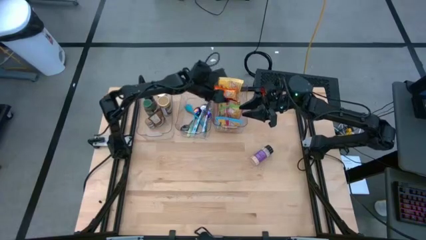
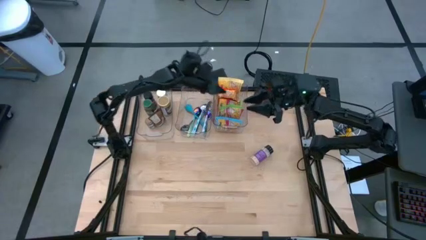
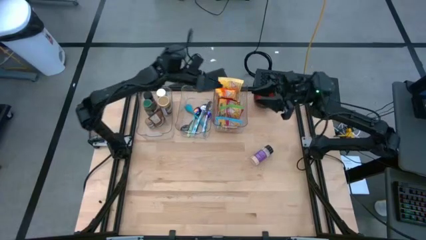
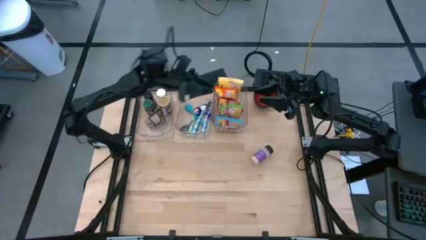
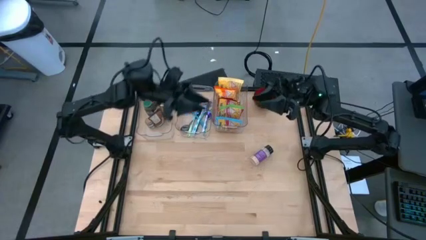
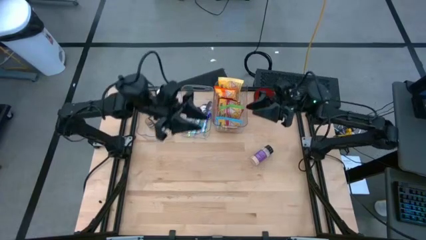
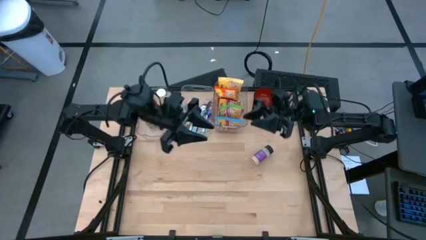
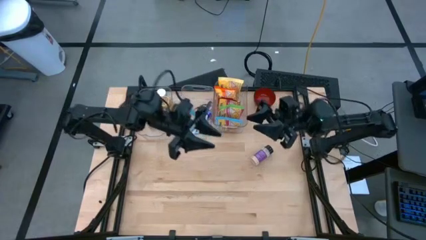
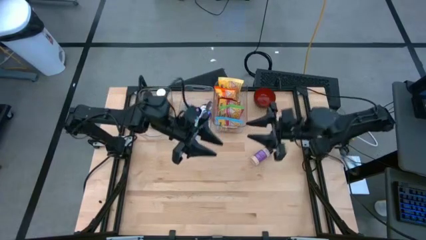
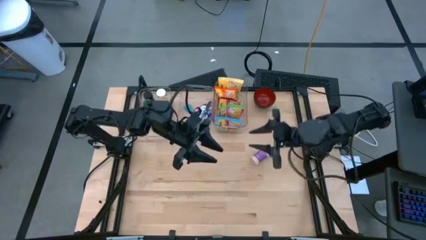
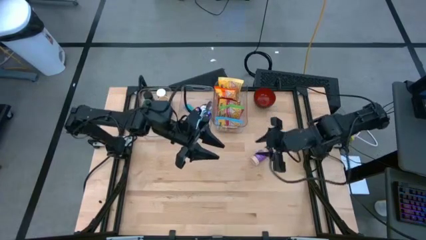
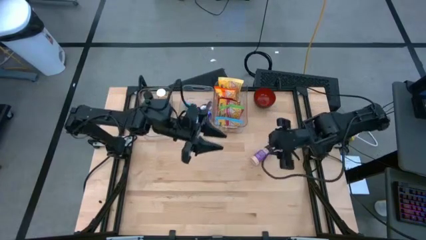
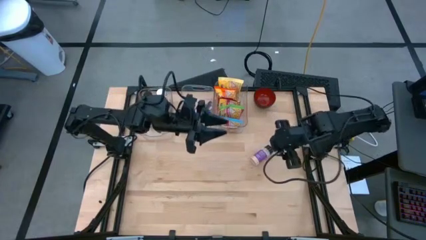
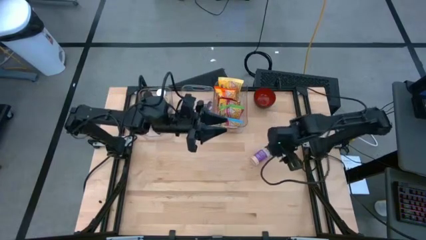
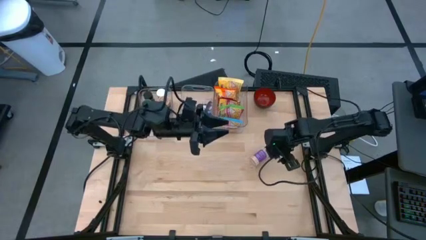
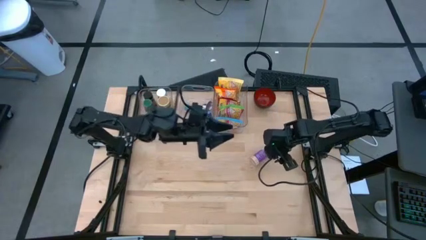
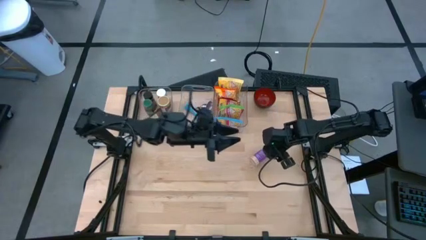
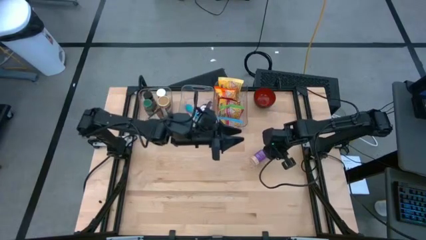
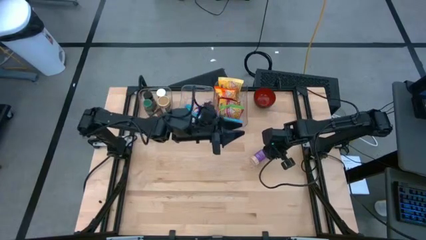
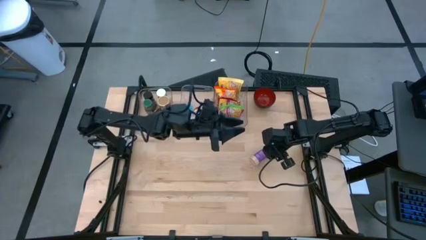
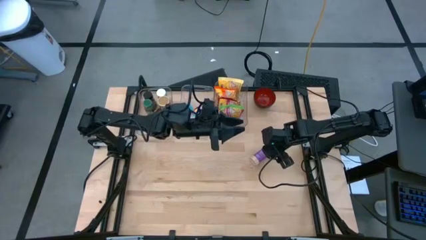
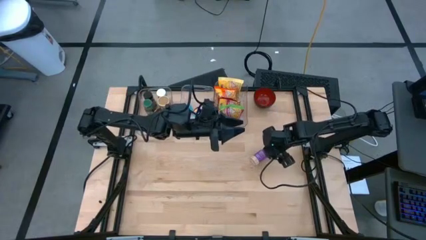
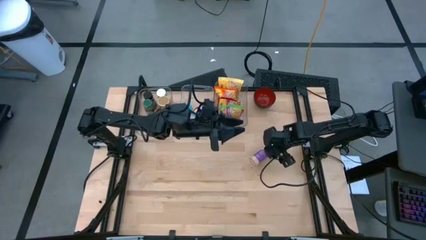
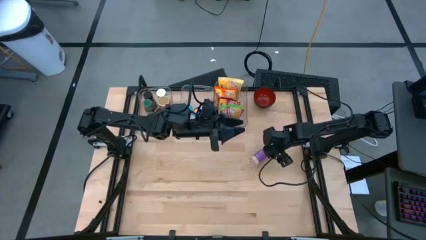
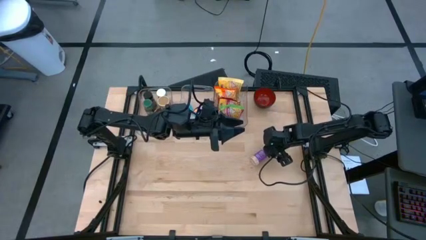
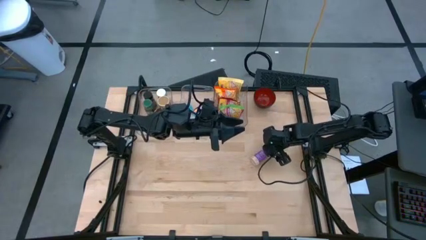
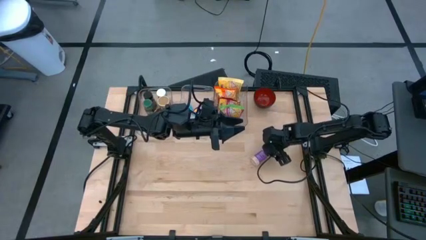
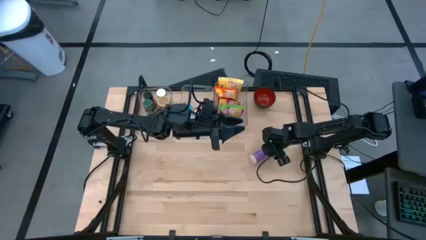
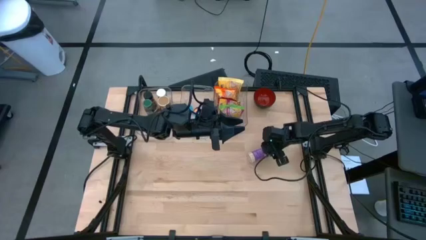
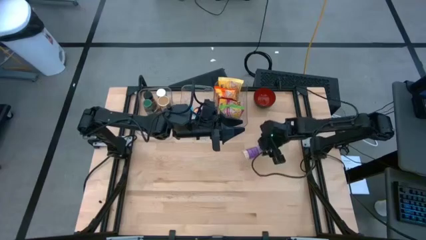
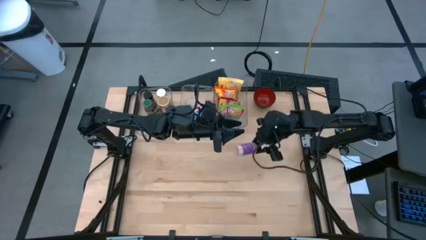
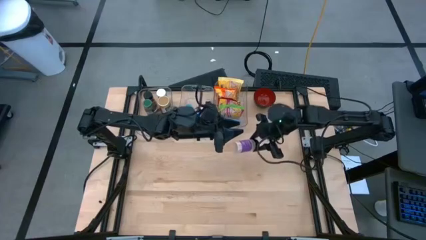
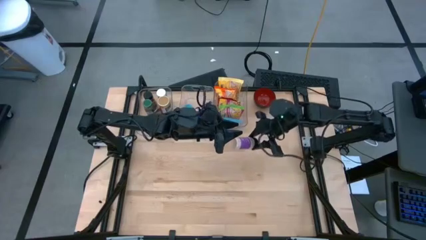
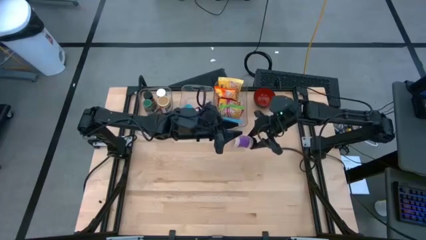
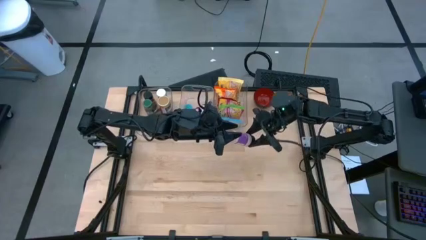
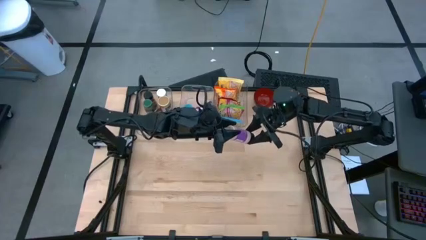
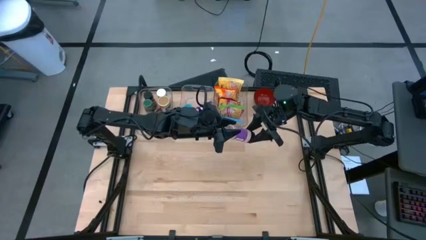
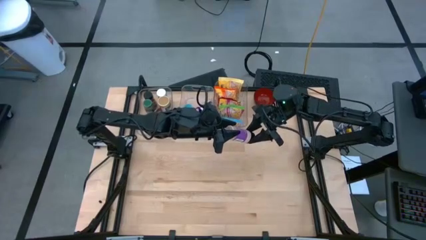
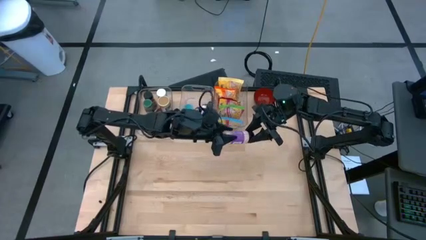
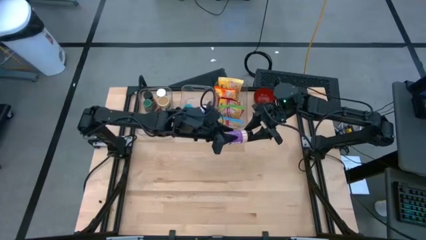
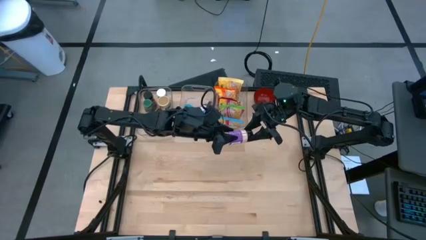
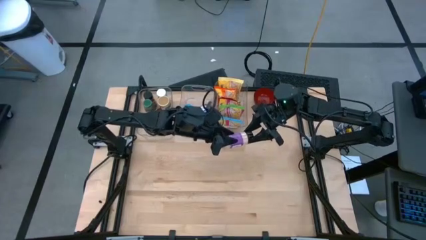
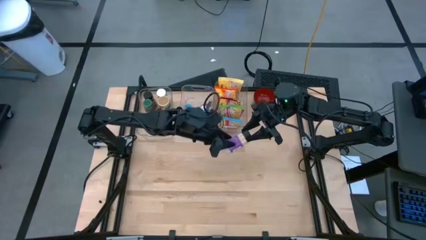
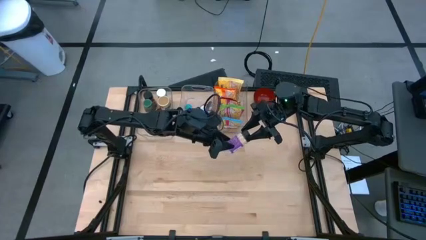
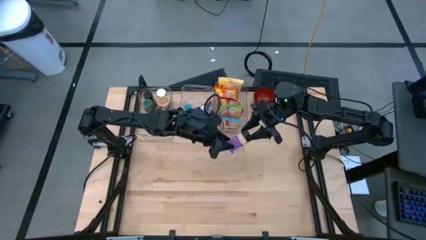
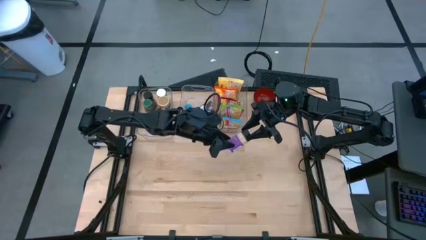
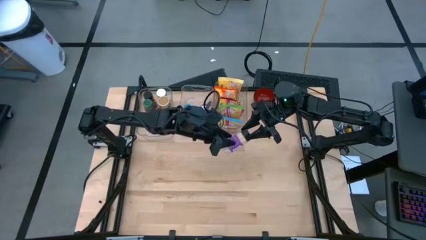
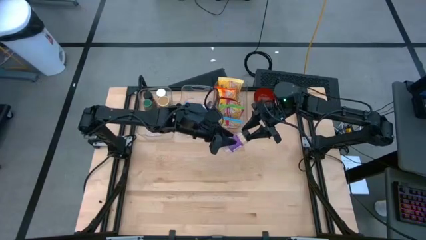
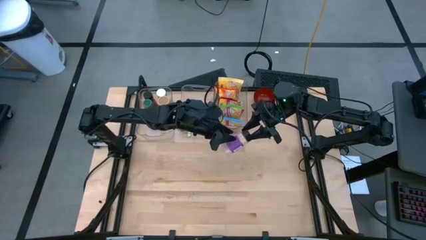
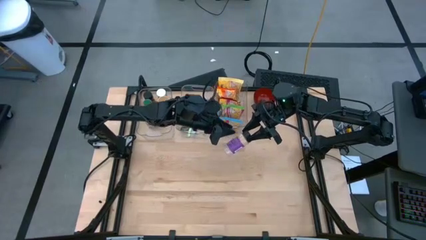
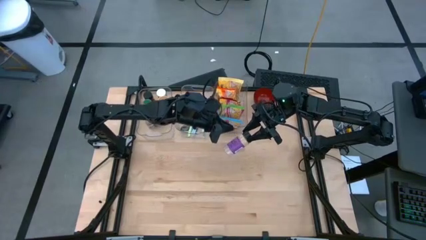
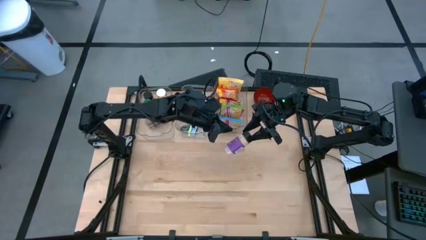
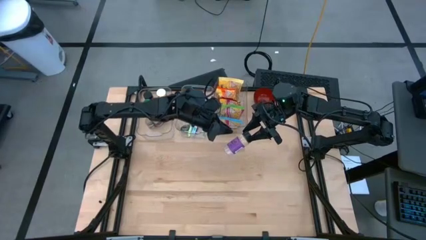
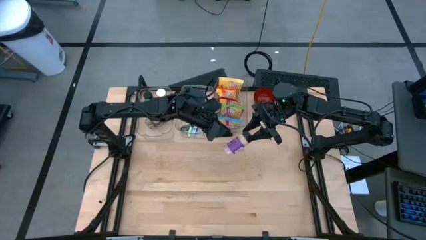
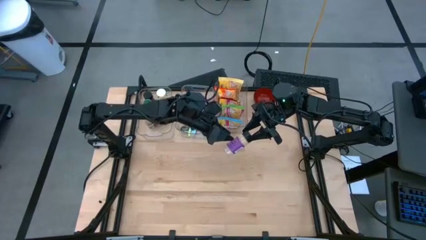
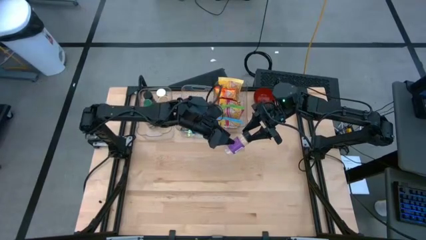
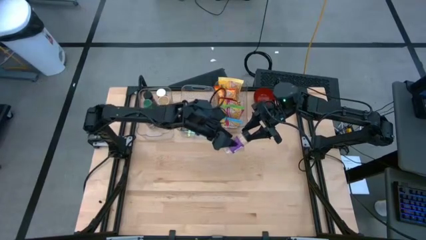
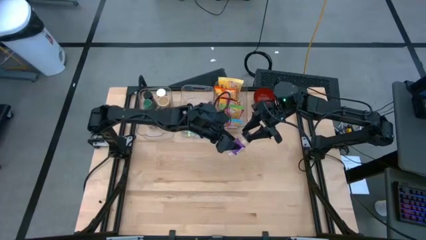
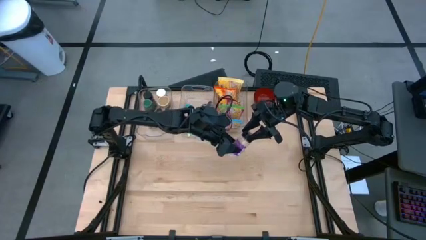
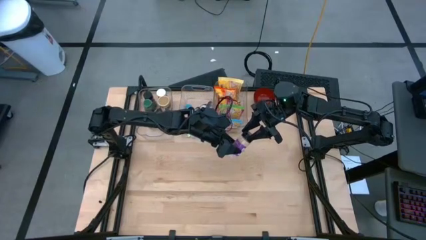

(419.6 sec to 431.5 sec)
Task: Pick & Place Food Item
Put the purple spice bottle into the left transparent bin
